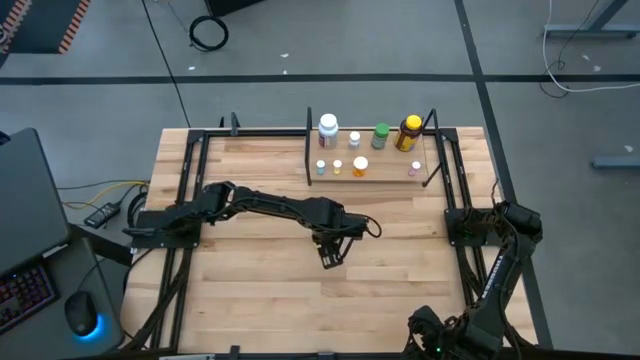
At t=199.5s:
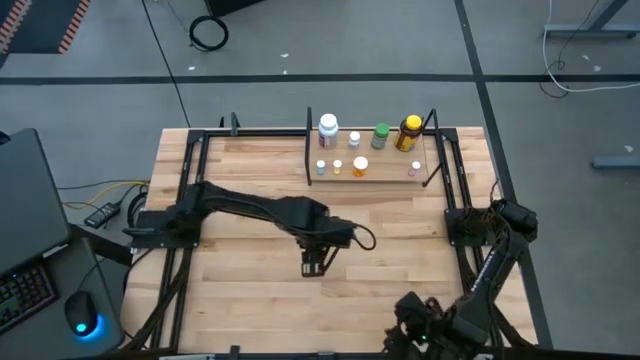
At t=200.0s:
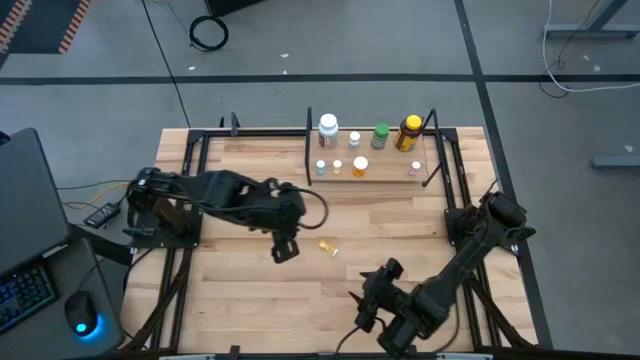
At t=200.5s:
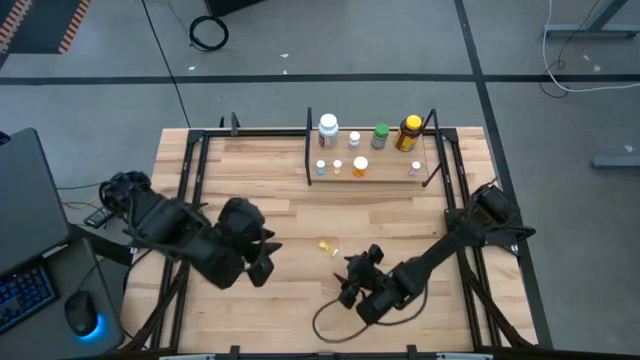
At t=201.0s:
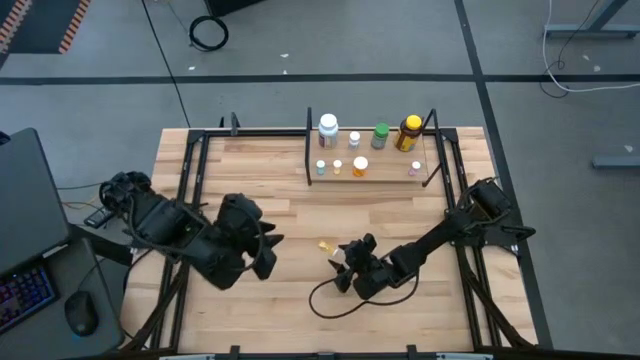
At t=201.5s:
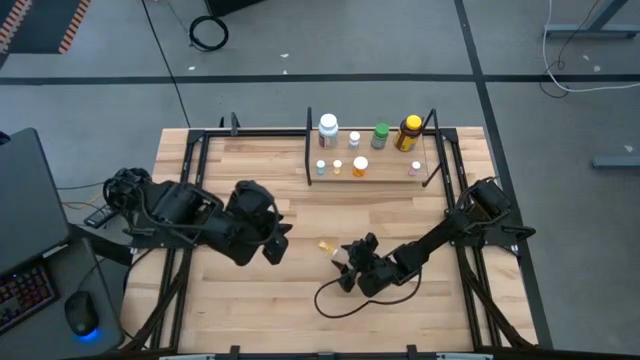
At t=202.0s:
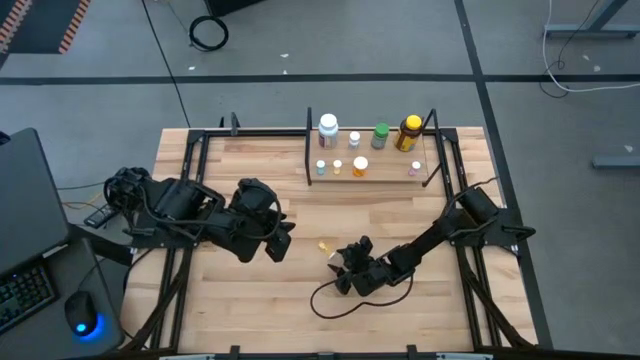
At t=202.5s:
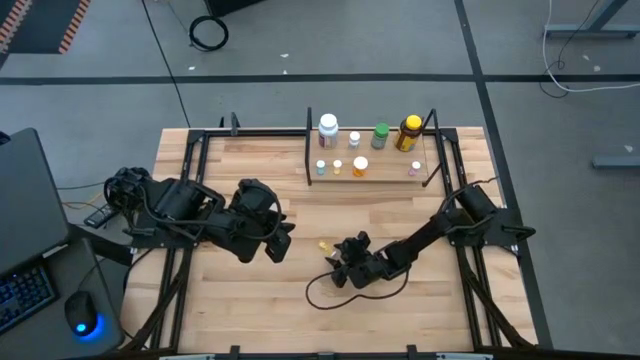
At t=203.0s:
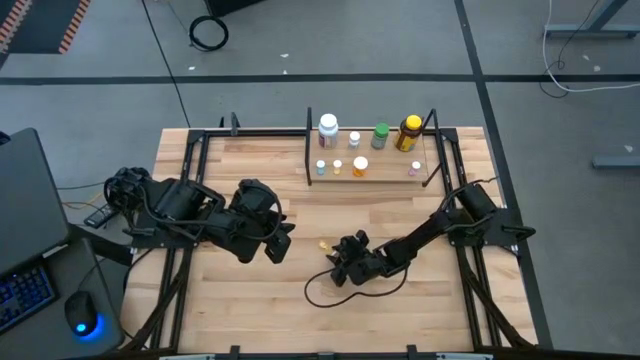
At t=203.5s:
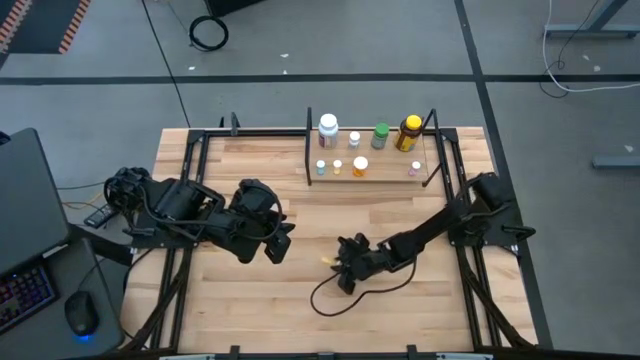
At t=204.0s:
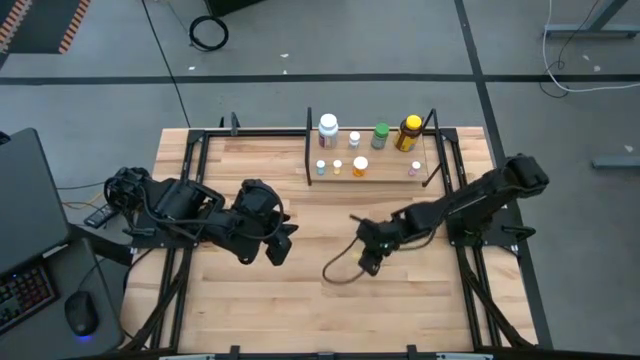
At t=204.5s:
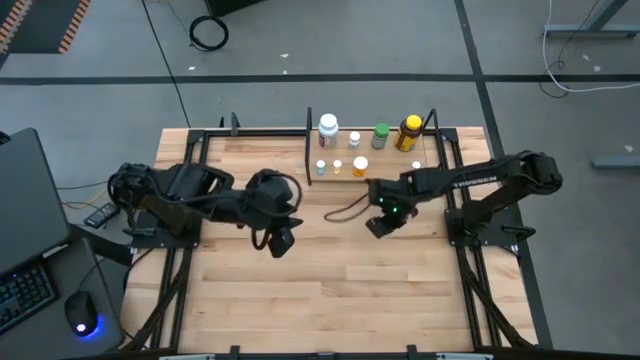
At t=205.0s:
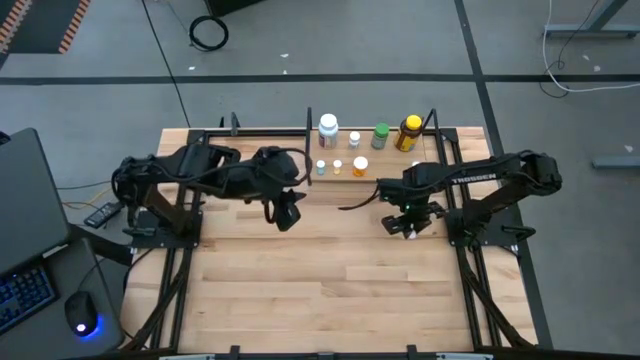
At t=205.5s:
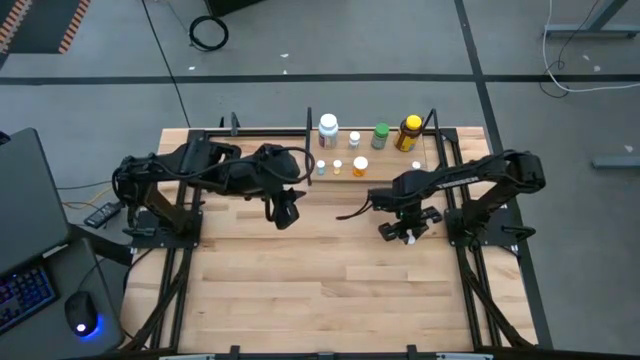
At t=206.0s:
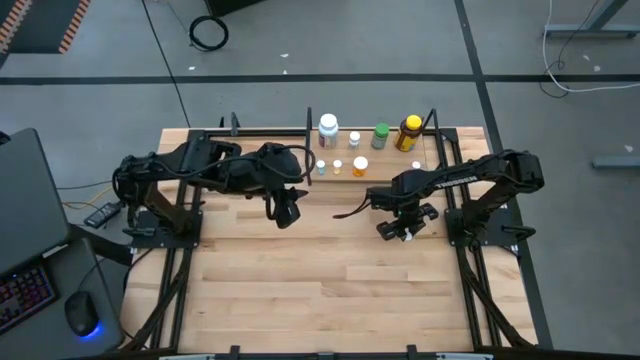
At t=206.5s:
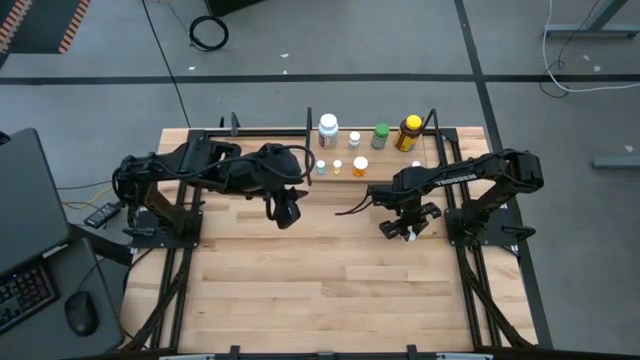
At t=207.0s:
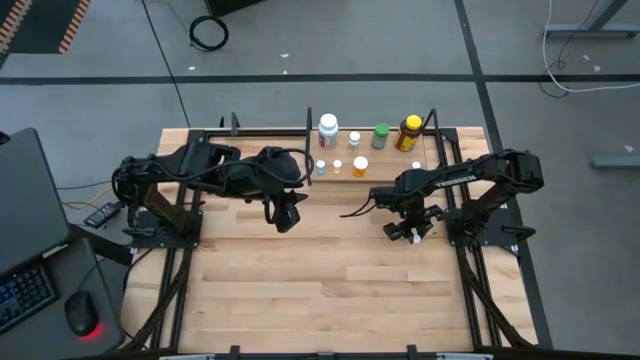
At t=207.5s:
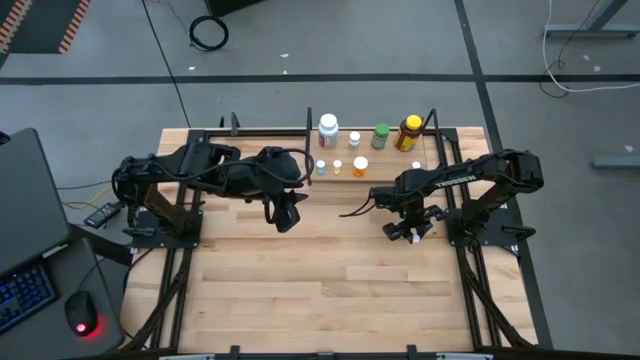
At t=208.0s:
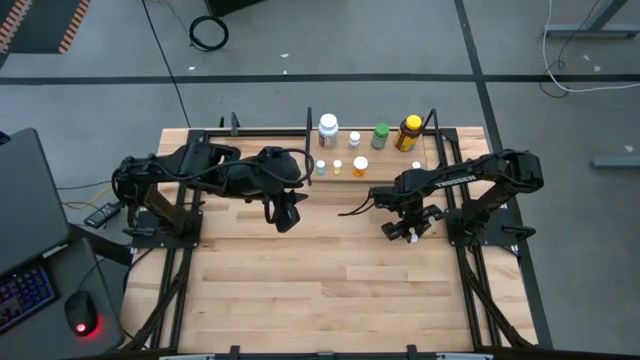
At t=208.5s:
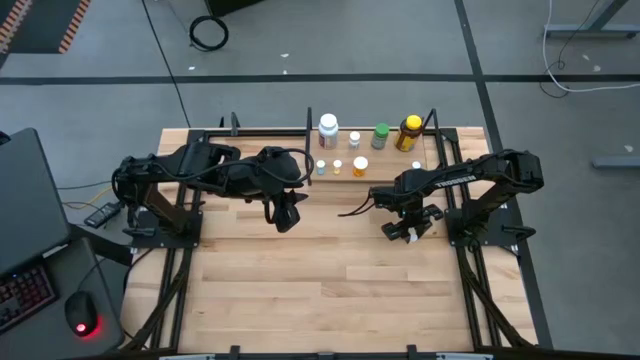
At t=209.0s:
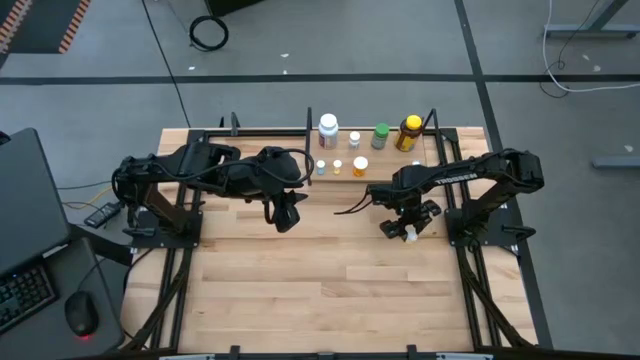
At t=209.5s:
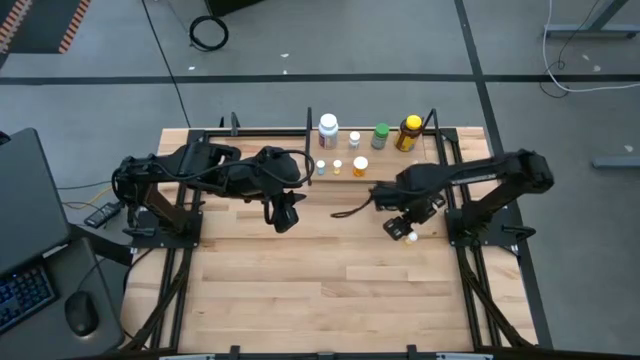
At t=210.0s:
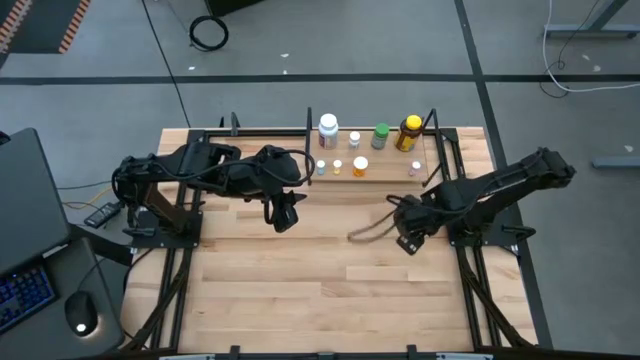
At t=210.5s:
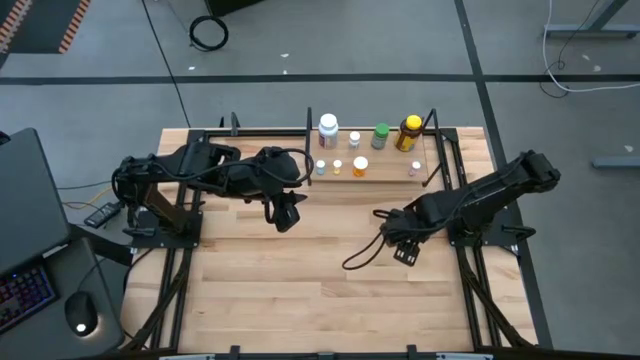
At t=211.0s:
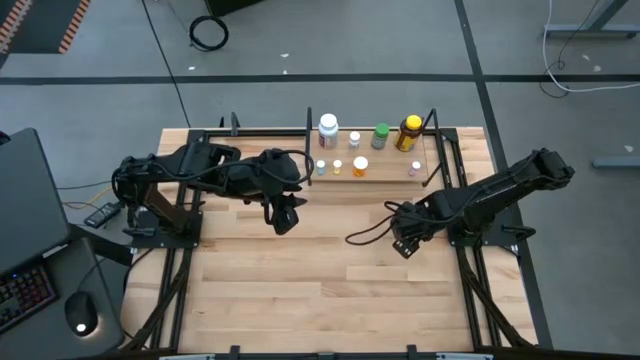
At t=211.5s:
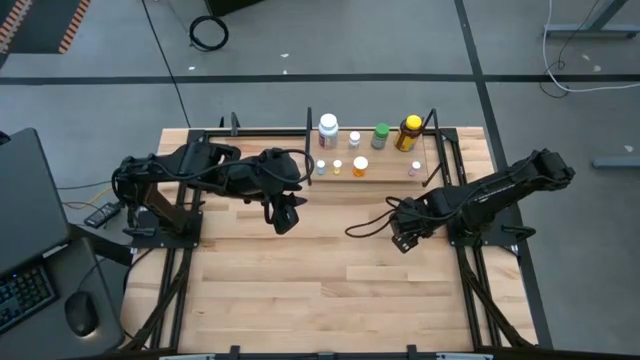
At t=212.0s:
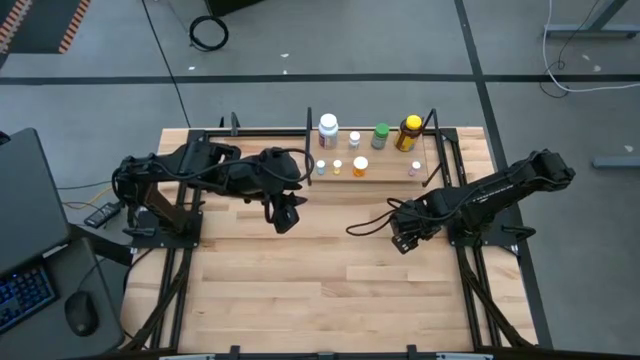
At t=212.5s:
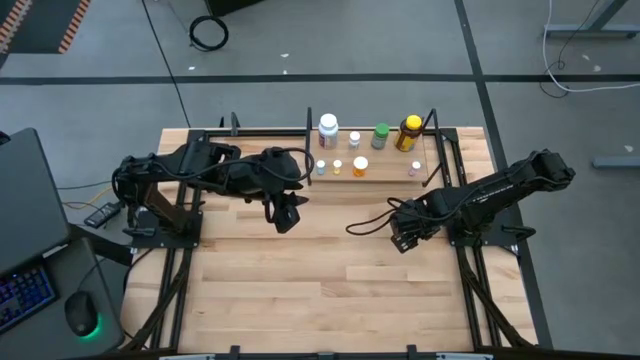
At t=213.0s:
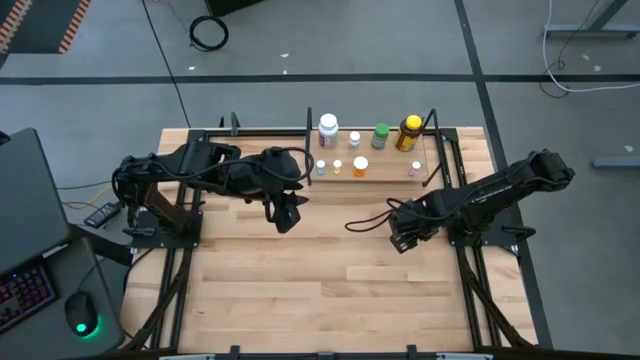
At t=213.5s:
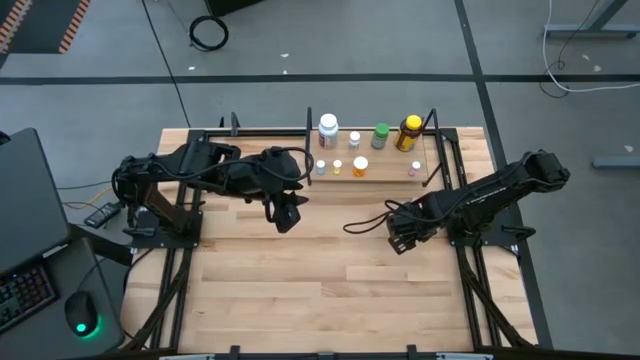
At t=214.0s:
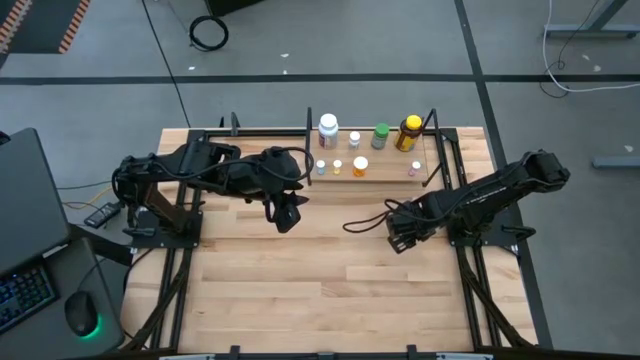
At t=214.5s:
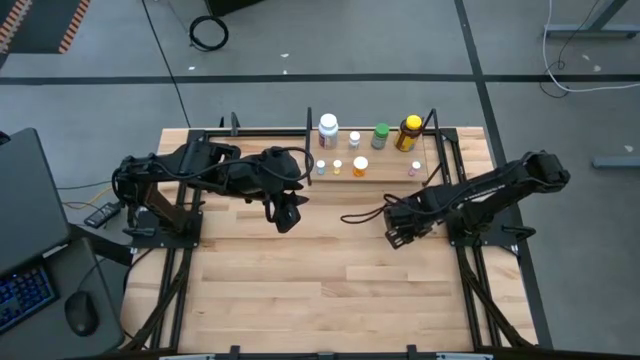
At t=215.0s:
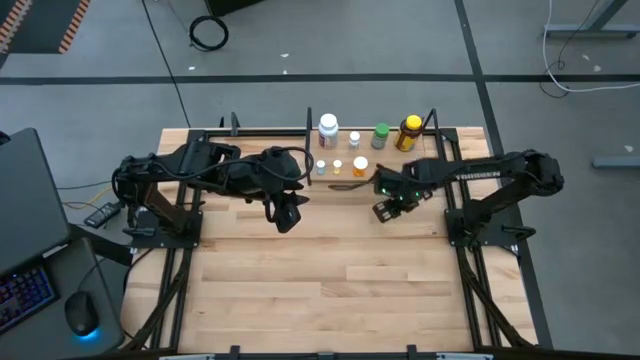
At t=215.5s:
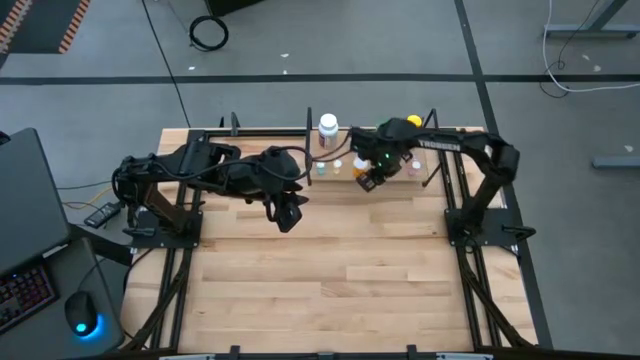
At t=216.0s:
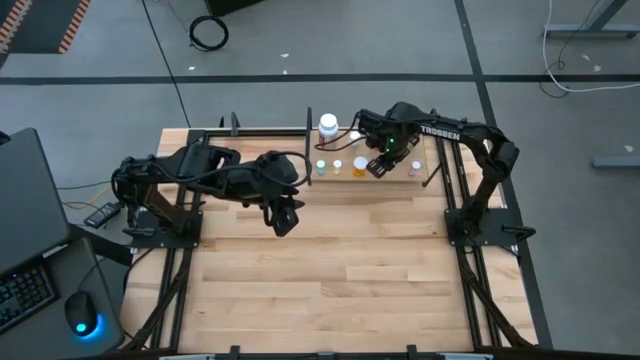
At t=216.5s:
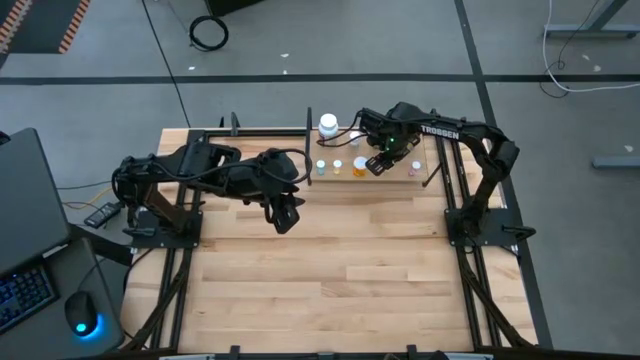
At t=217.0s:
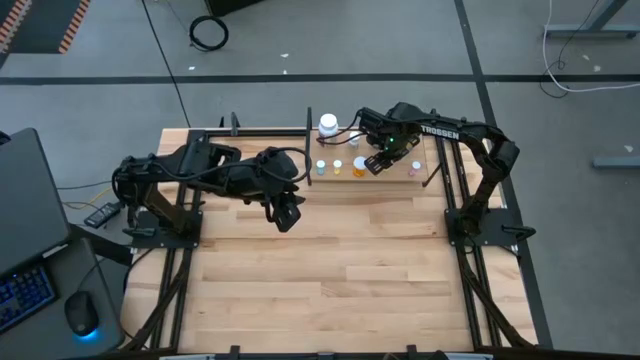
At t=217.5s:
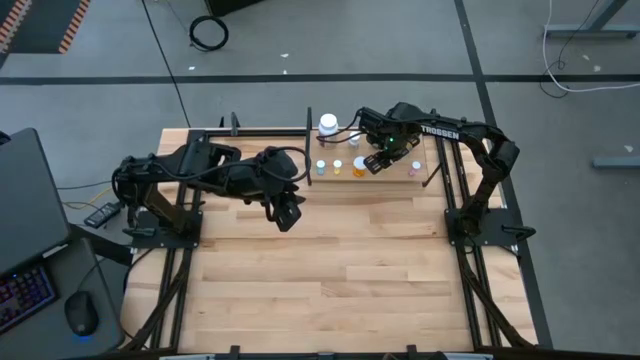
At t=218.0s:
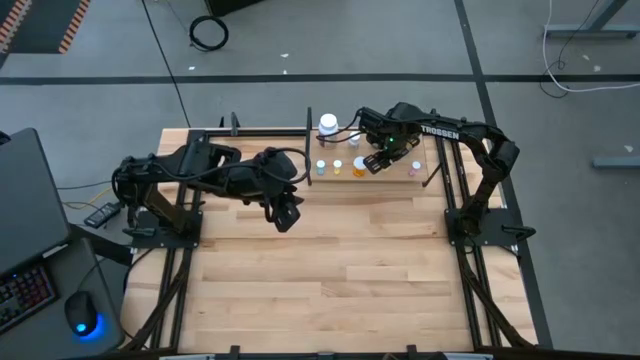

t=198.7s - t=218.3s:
Task: Pick and place medicine bottles onto shelf by color
Put the small yellow pill bottle on the shelf
